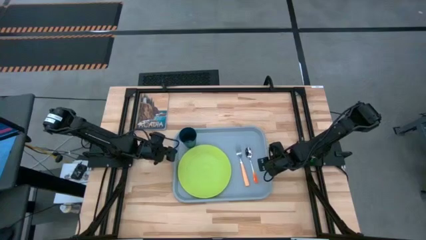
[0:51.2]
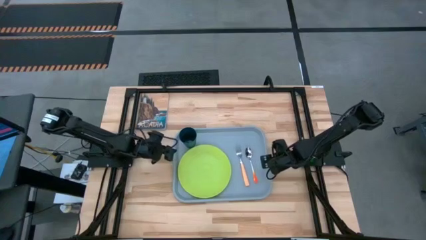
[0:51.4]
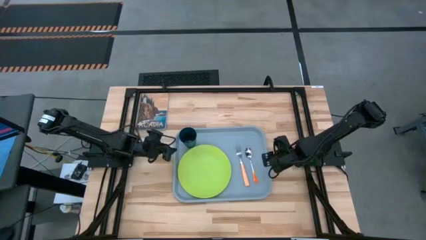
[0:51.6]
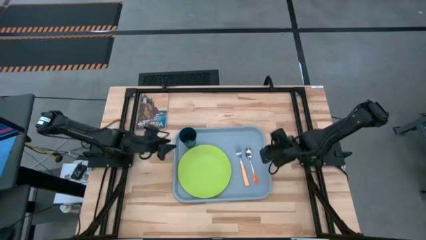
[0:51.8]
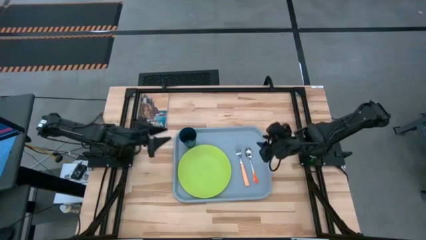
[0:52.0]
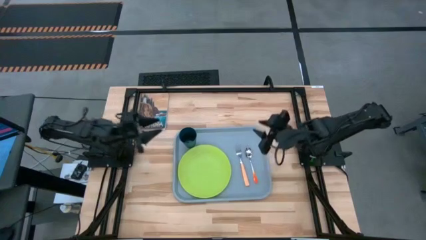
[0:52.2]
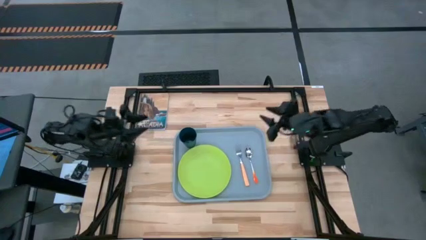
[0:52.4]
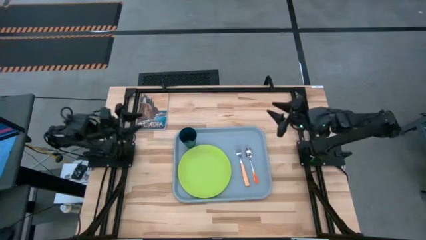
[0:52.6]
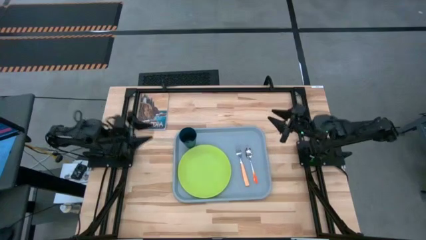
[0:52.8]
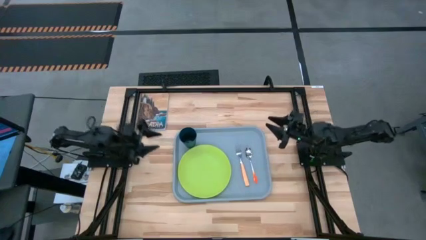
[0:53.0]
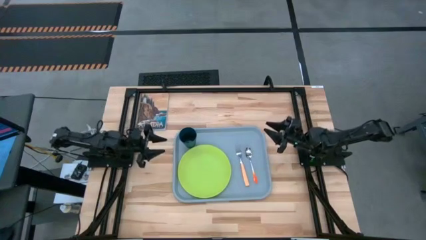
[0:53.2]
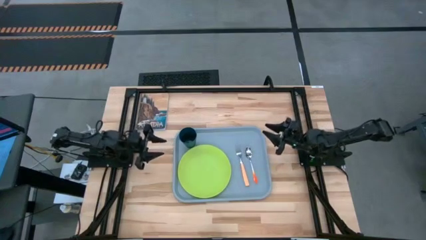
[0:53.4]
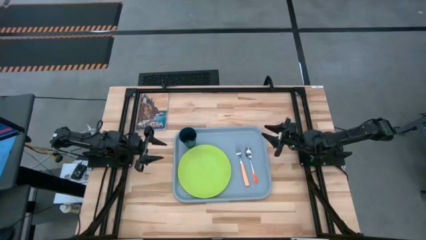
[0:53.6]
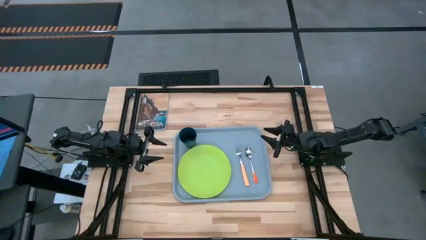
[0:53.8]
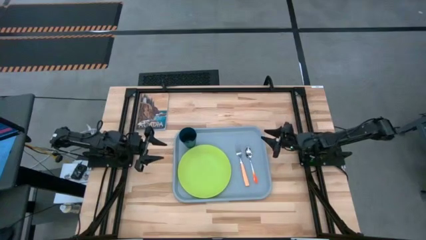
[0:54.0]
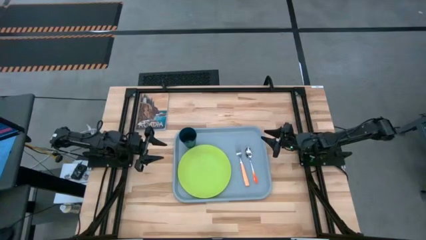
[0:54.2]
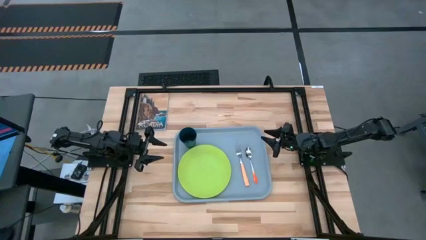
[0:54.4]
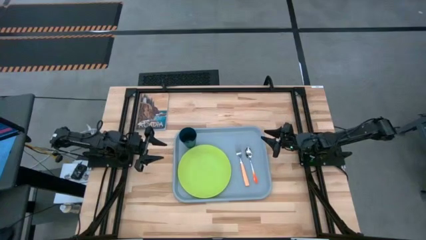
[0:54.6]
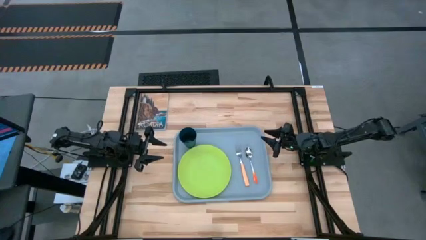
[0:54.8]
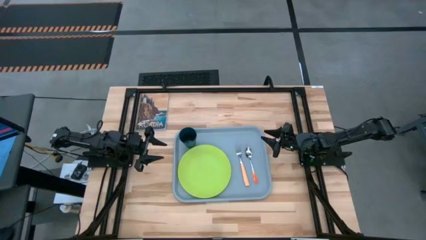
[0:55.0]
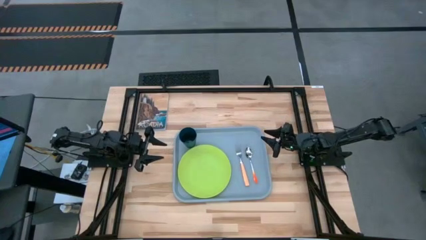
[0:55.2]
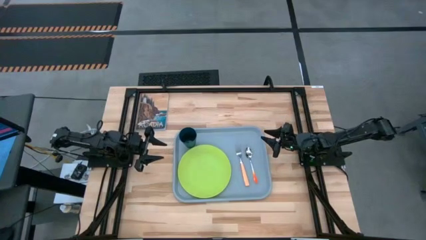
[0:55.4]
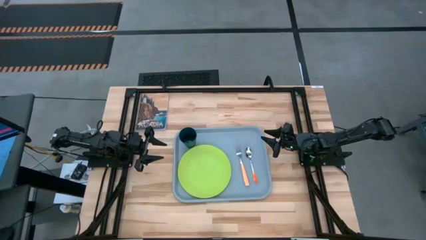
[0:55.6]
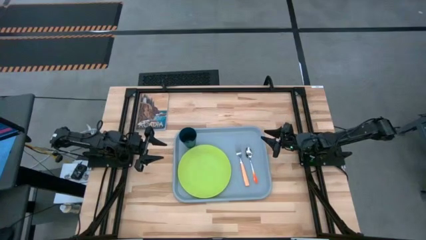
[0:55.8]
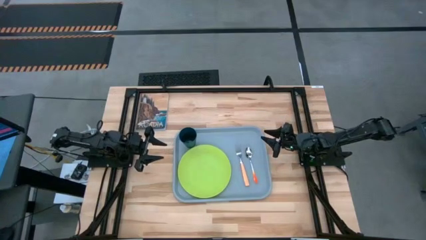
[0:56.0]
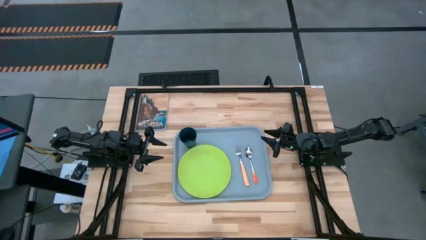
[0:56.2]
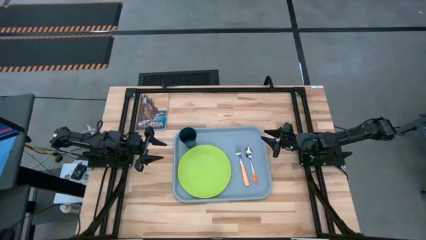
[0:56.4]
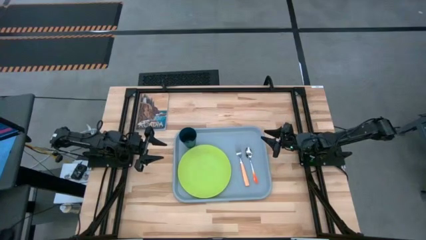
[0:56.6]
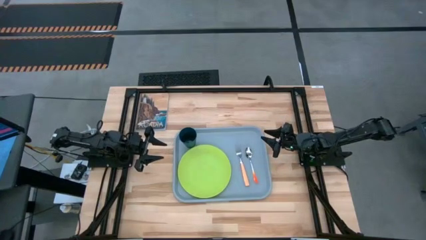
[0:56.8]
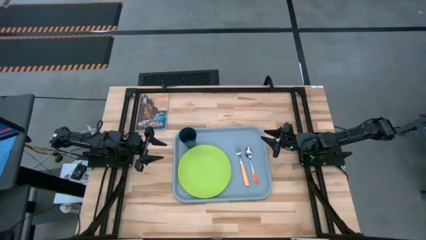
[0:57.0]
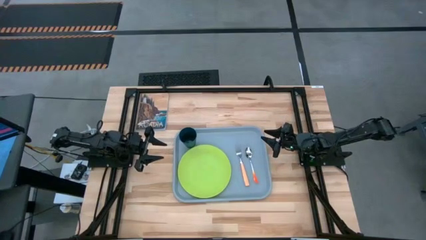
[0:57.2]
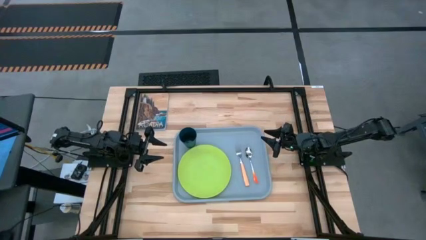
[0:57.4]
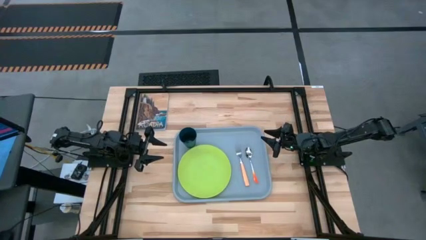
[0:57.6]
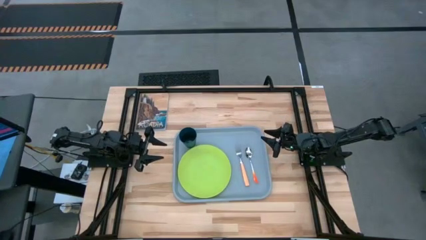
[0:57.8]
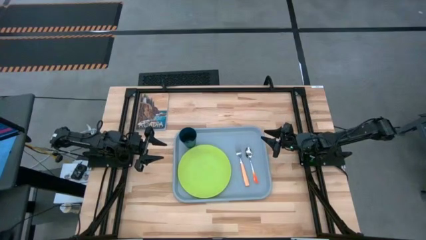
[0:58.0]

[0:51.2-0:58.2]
Task: Pick and place plate/cup/fork/spoon on tray
Return to Home Position

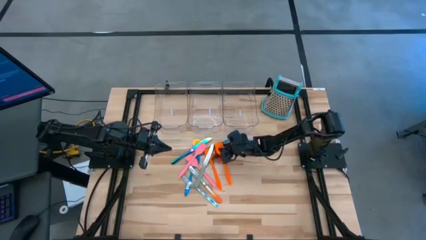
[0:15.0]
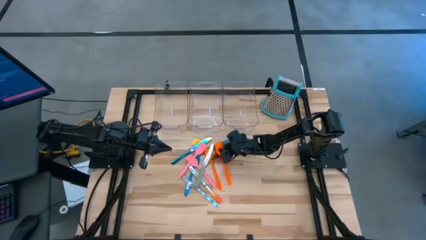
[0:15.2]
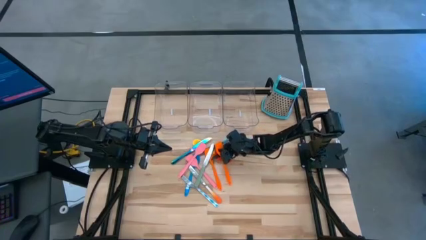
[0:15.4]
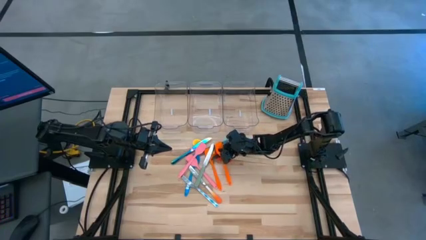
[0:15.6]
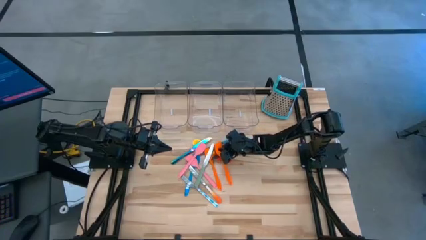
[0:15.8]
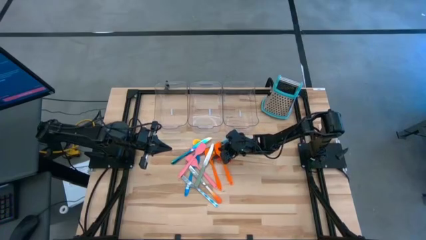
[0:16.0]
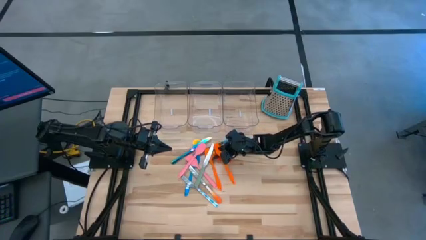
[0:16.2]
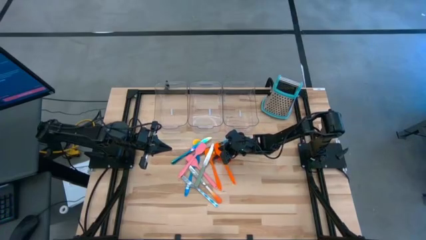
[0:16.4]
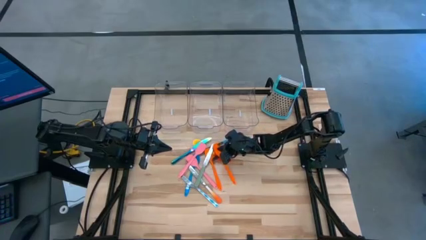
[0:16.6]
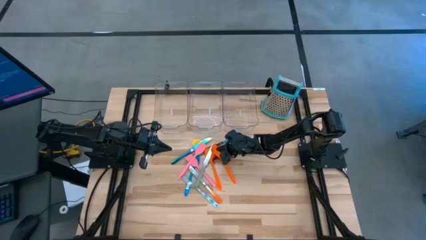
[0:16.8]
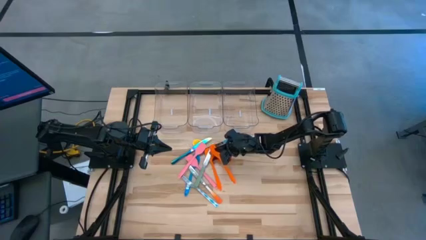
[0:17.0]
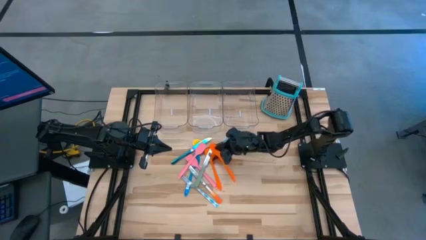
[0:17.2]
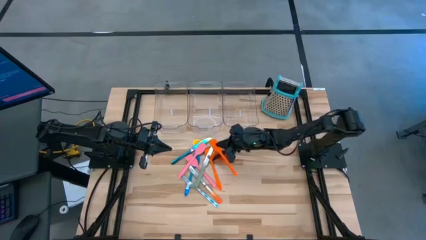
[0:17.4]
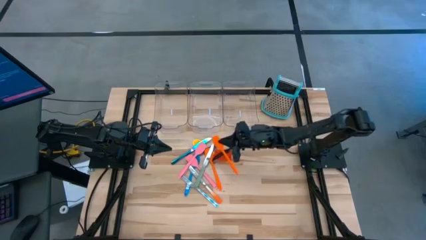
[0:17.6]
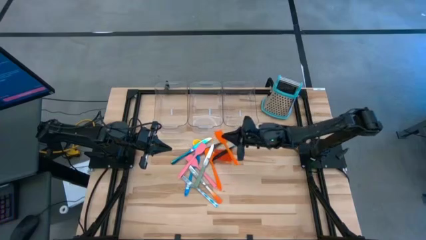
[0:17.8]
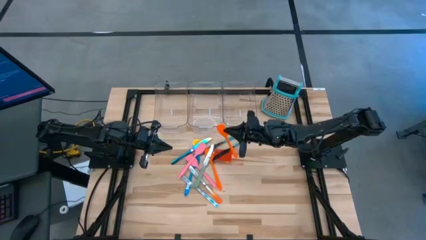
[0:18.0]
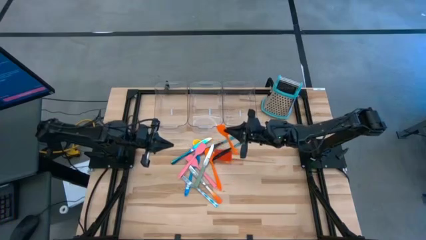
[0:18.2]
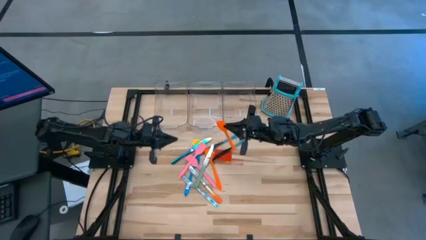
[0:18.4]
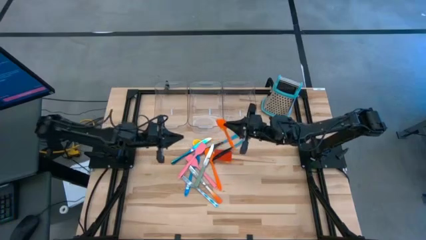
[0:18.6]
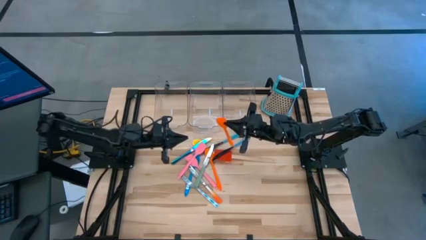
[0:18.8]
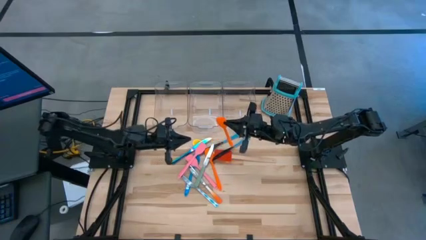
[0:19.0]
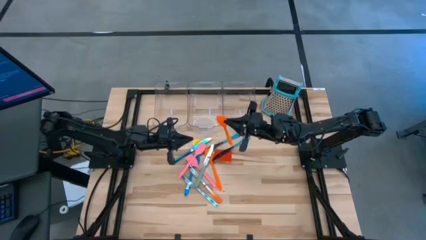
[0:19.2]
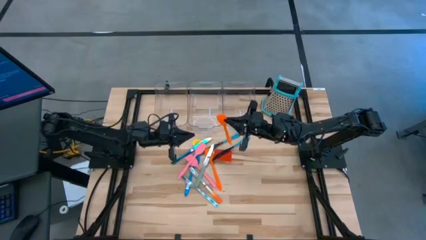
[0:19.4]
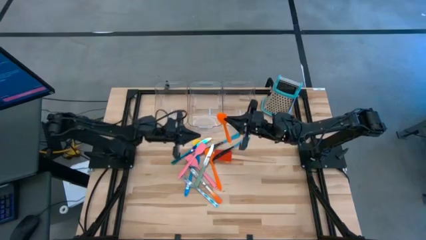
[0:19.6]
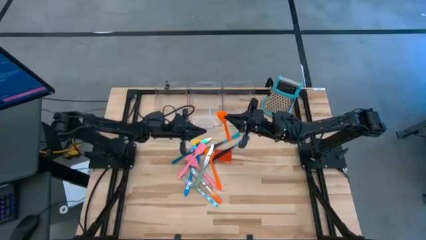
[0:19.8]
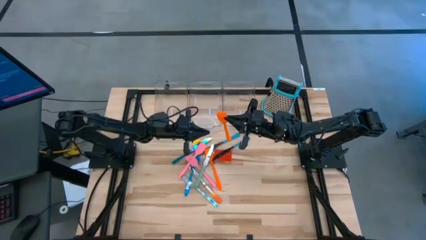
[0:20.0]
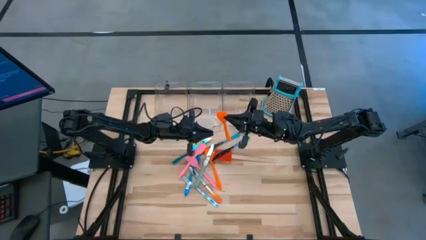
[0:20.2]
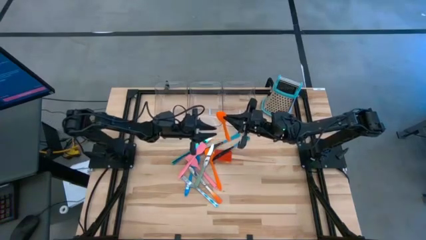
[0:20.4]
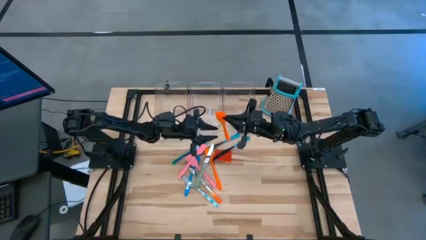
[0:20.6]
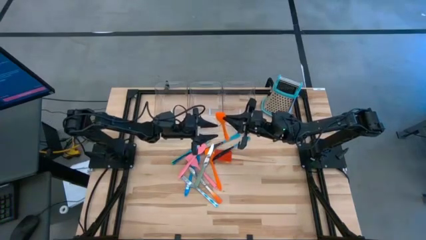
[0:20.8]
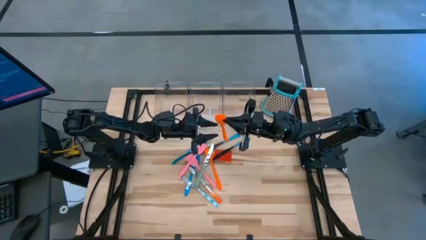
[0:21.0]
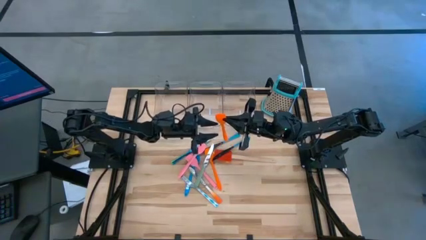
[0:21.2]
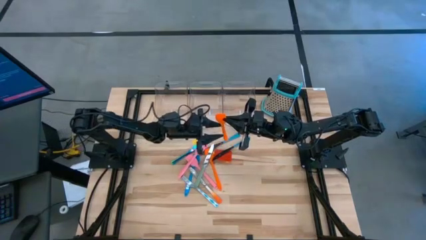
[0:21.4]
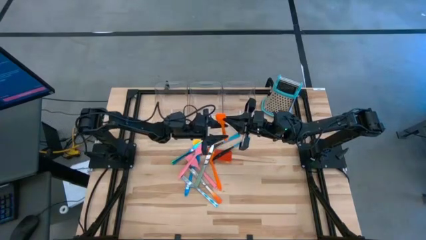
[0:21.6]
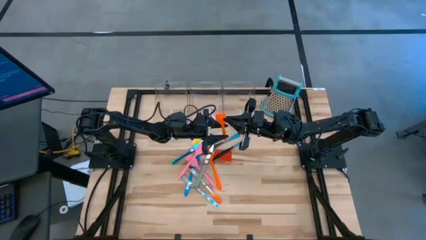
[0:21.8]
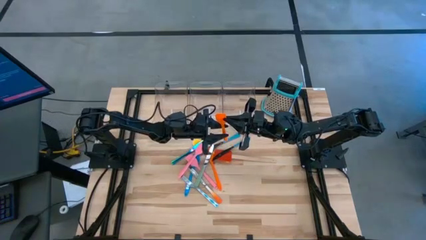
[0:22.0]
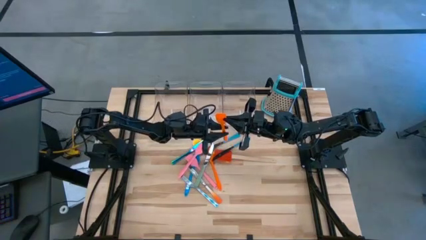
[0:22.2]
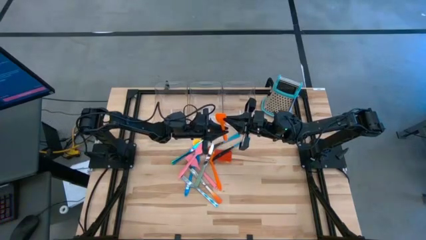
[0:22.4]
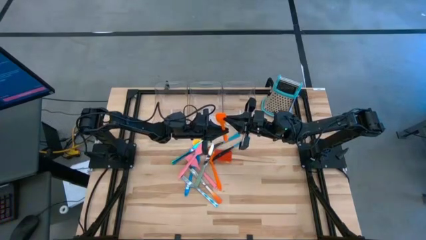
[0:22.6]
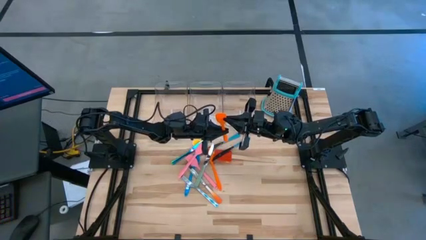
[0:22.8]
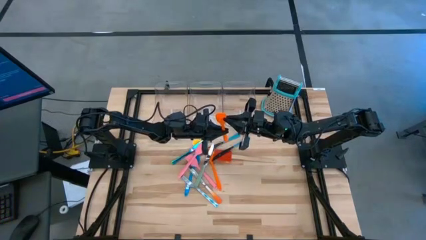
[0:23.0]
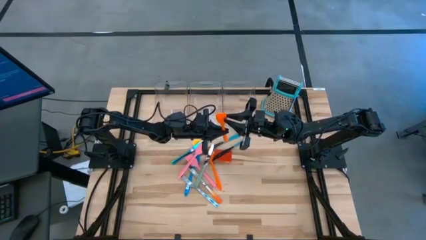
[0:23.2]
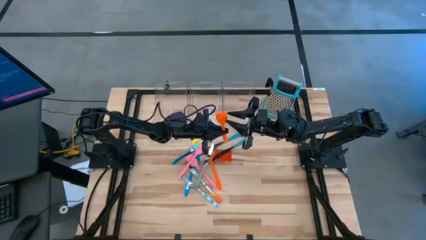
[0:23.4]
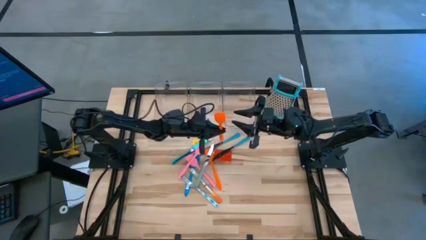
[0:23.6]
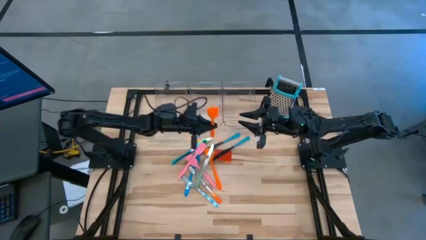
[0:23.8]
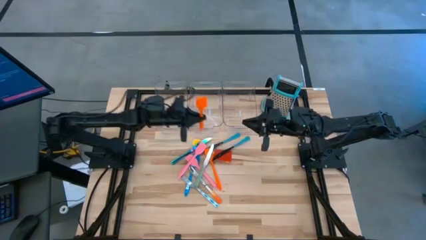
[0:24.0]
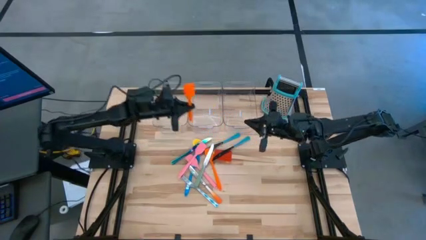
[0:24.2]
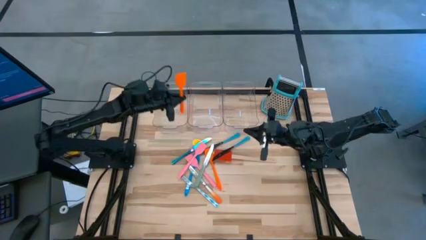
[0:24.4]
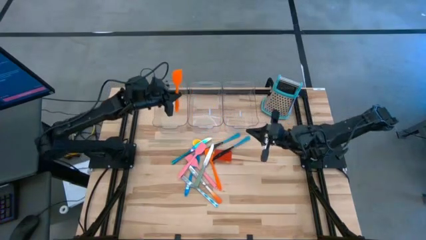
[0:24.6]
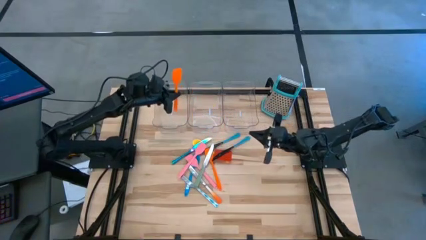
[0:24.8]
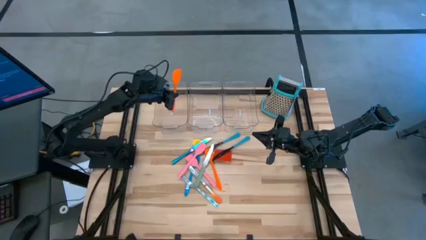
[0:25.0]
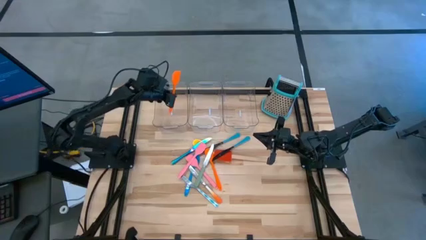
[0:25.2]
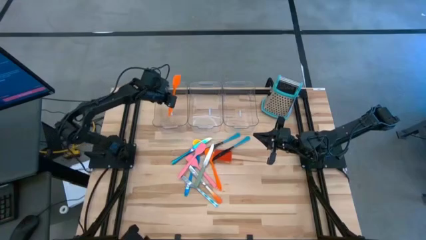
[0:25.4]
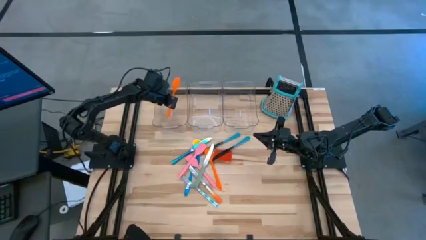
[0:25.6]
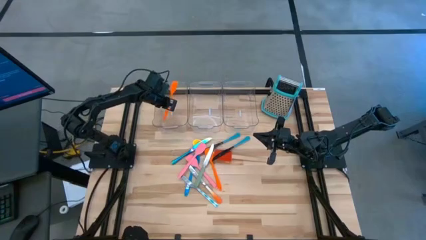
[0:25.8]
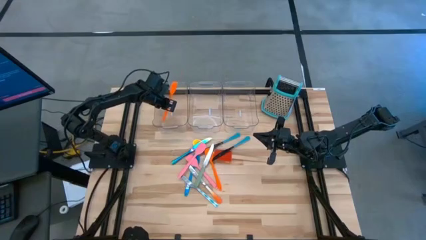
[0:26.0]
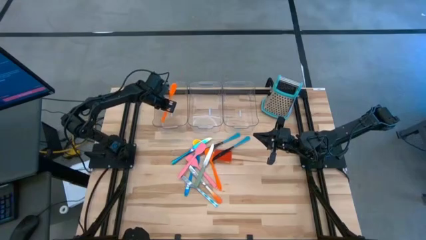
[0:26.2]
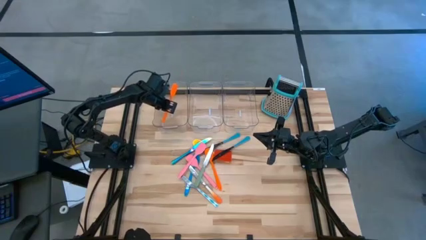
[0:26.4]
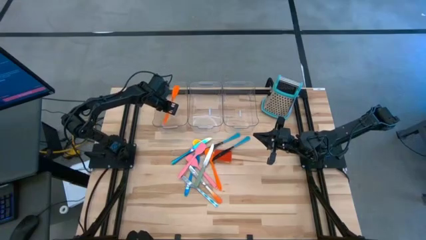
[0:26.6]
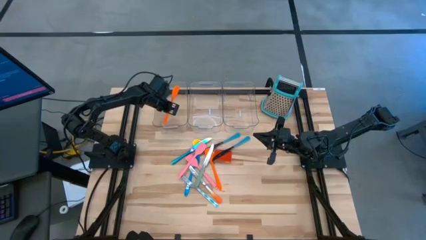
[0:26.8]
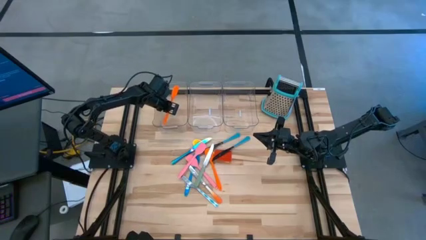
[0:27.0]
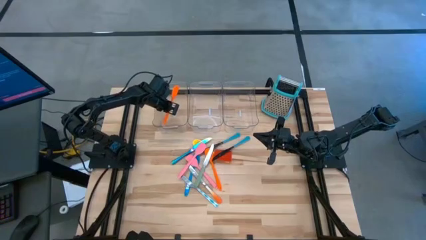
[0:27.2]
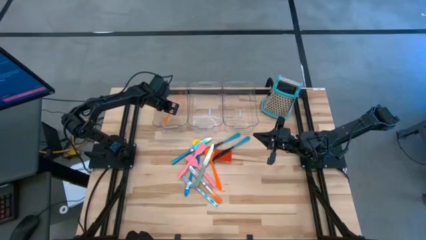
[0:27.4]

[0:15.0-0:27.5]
Task: Pick & Place Kitchen Items
Put the right orange spatula into the left transparent bin
